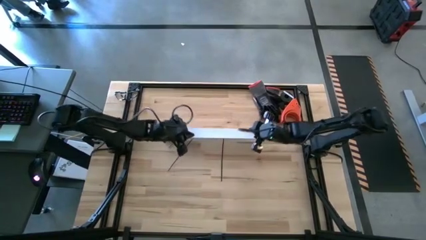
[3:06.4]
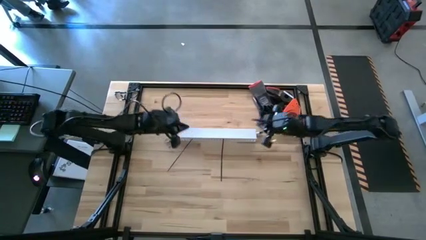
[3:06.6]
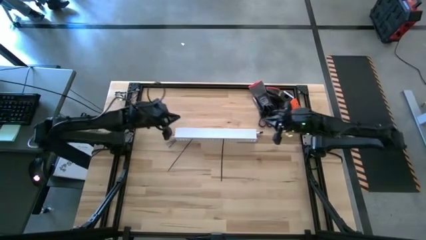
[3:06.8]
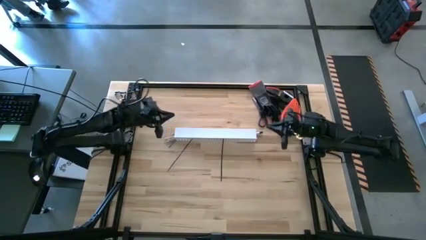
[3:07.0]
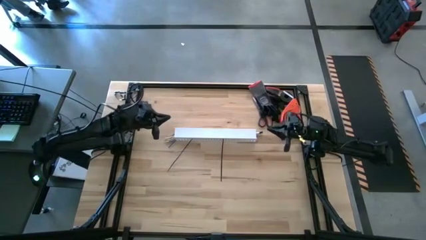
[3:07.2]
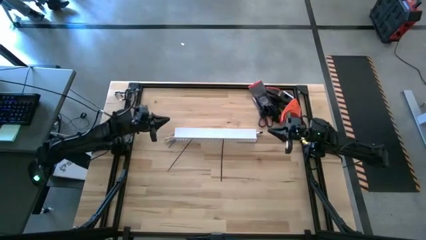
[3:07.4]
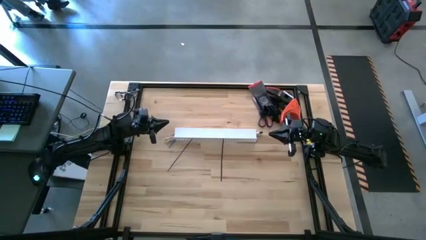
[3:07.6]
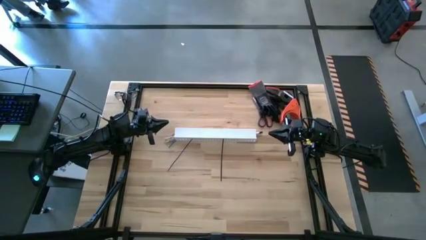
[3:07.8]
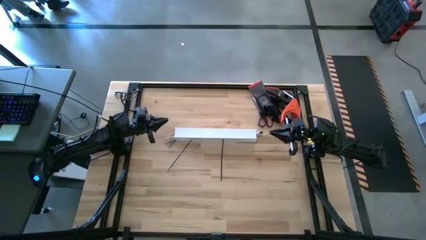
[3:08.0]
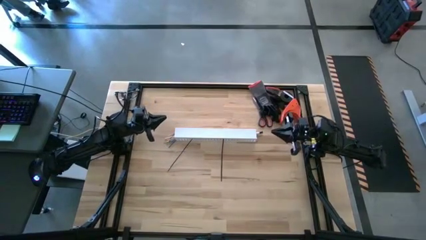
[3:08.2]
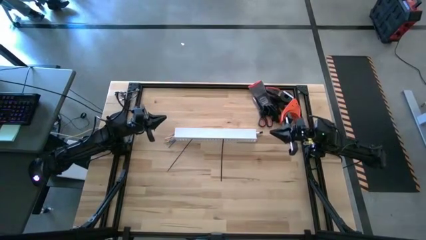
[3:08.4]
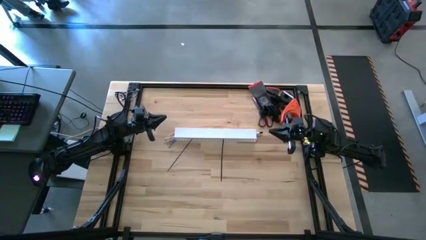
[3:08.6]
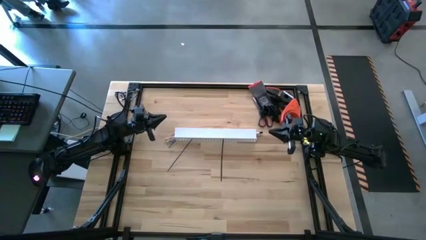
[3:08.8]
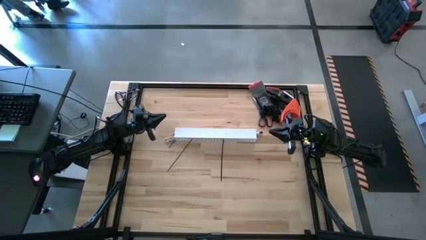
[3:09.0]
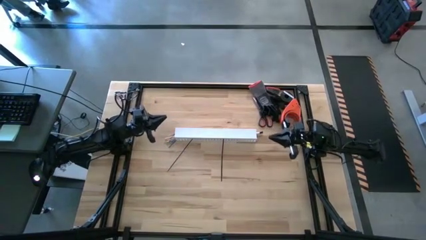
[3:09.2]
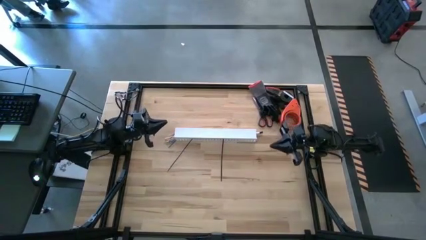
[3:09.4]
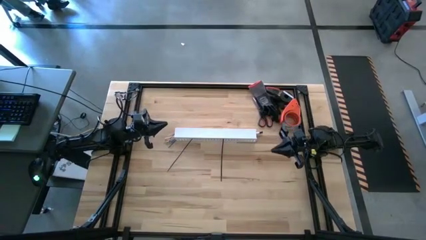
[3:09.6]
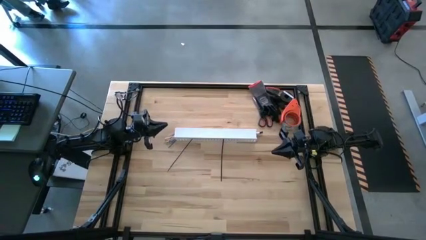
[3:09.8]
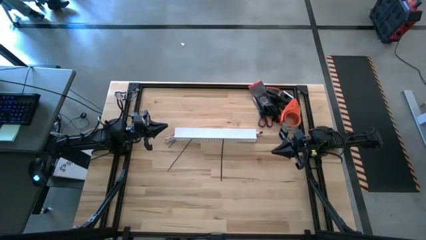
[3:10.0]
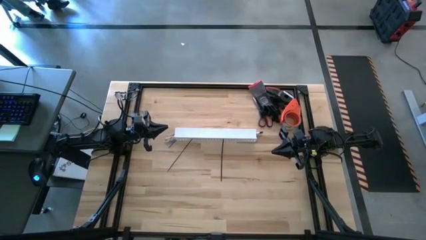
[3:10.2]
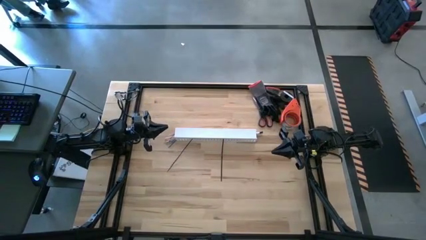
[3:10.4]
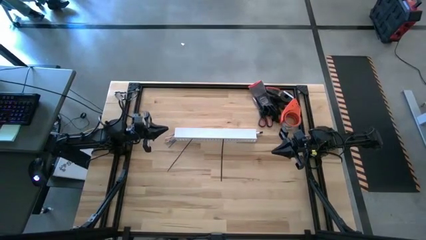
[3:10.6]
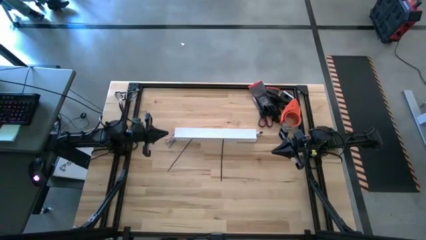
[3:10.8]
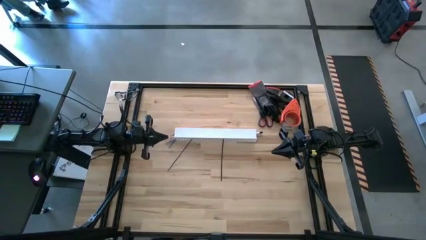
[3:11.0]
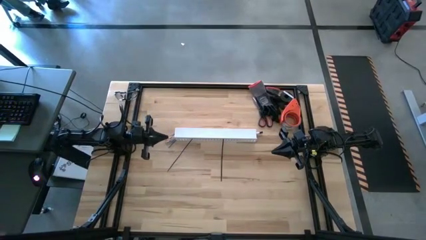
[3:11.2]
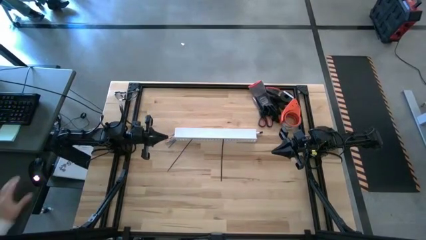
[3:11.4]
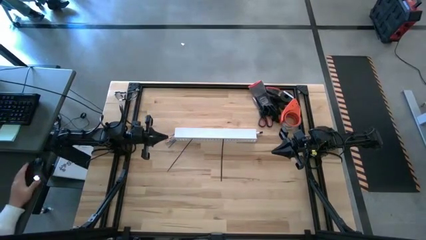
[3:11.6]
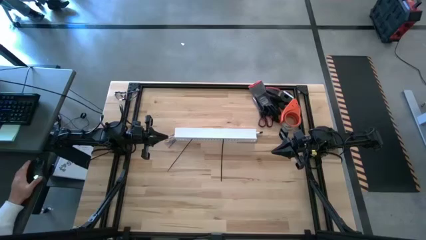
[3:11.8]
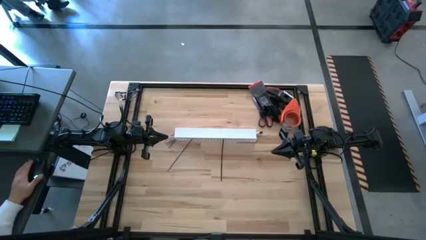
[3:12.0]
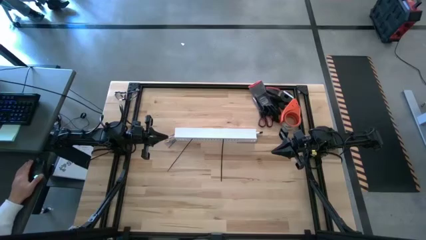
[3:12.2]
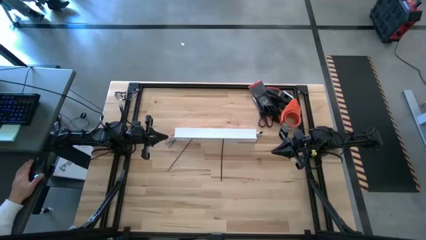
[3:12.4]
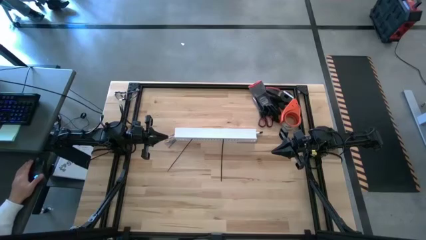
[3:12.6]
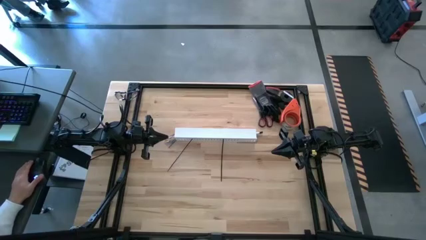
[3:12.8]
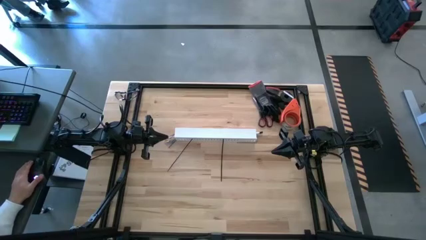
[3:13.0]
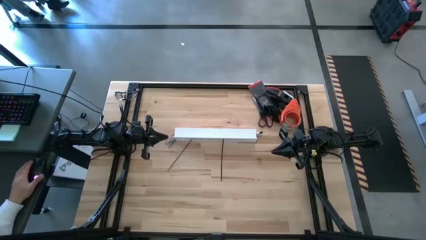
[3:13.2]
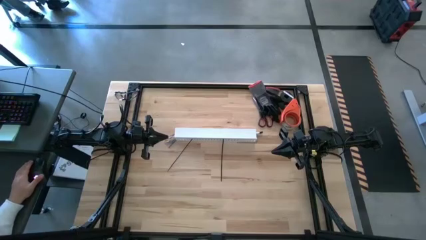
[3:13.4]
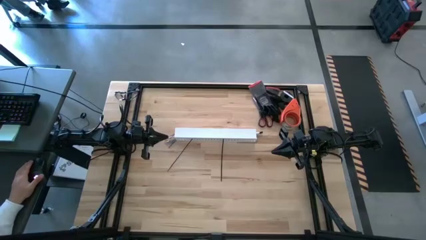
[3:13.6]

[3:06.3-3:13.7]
Task: Ziptie cables
Return to Home Position

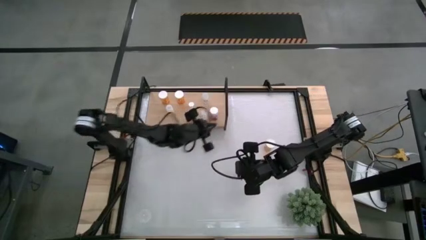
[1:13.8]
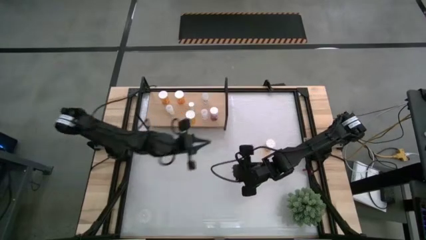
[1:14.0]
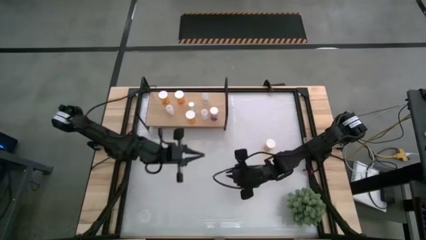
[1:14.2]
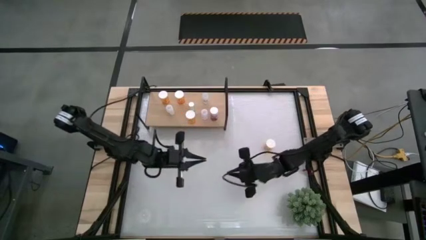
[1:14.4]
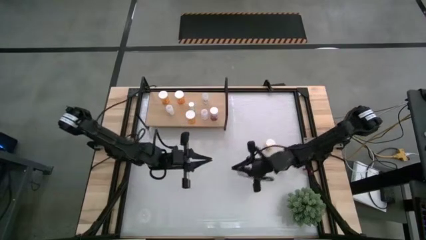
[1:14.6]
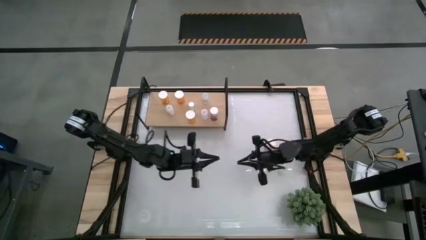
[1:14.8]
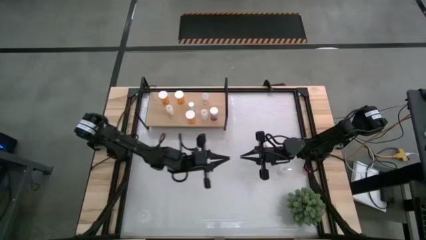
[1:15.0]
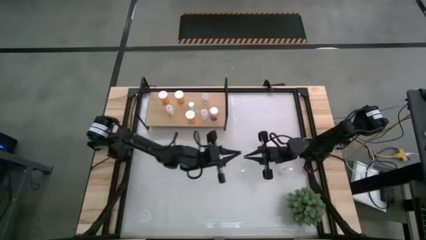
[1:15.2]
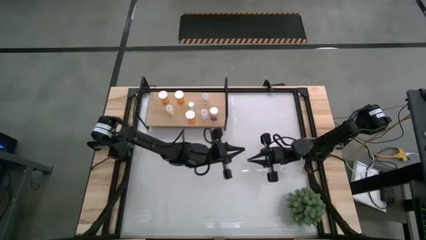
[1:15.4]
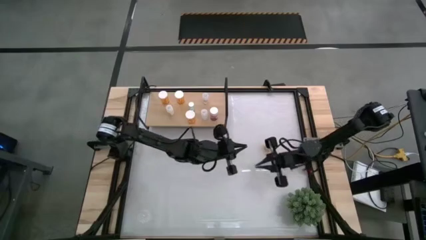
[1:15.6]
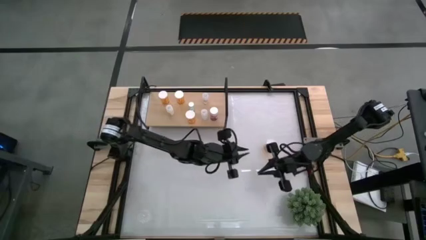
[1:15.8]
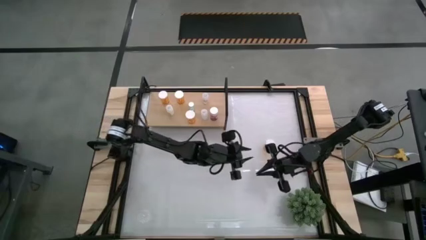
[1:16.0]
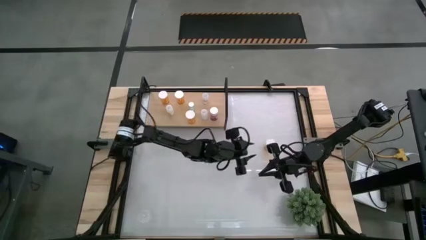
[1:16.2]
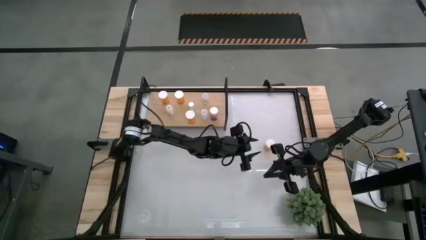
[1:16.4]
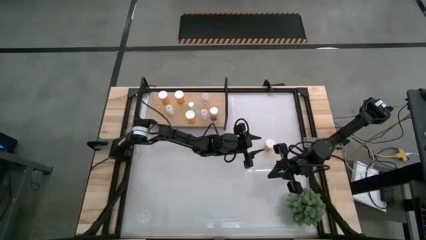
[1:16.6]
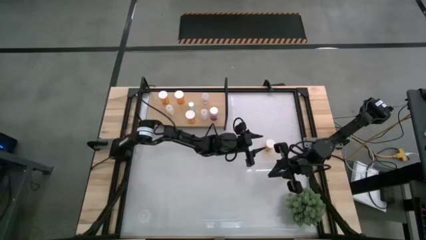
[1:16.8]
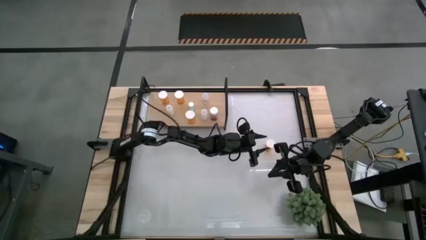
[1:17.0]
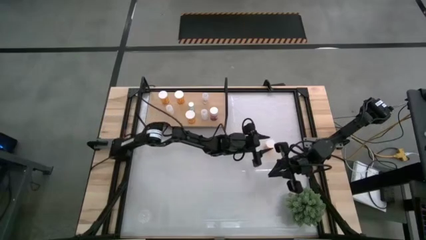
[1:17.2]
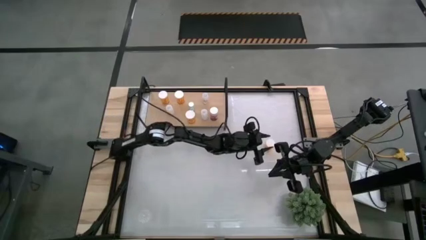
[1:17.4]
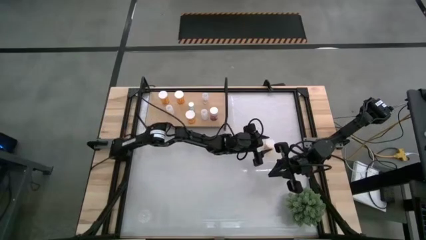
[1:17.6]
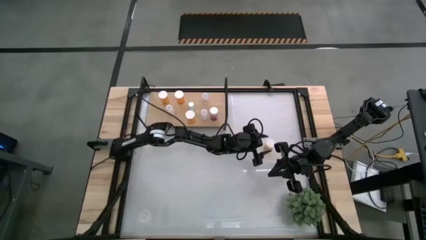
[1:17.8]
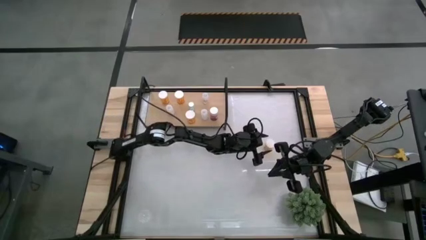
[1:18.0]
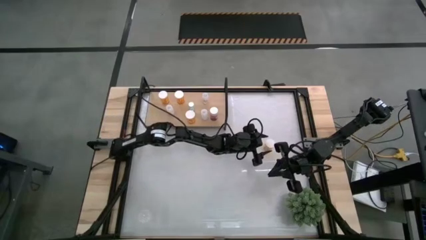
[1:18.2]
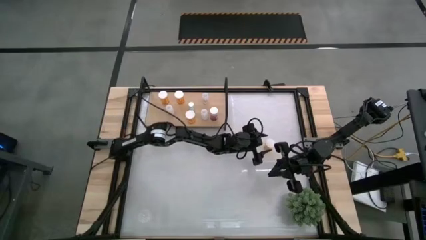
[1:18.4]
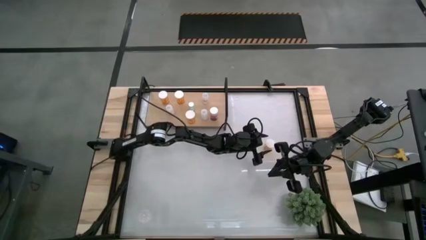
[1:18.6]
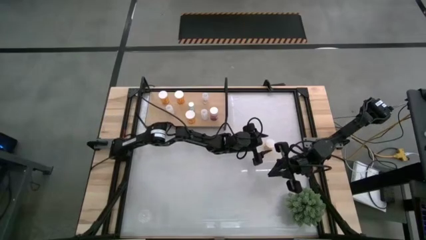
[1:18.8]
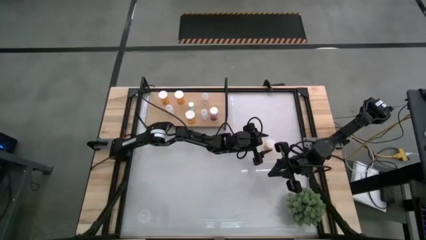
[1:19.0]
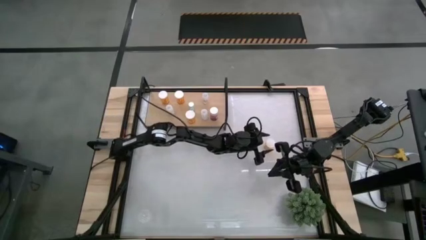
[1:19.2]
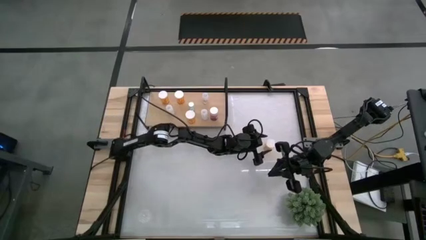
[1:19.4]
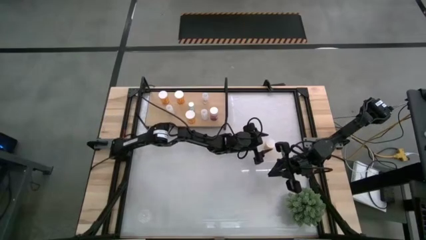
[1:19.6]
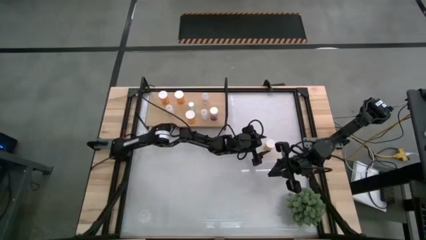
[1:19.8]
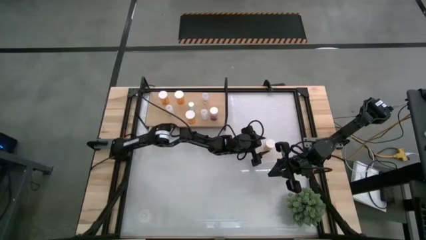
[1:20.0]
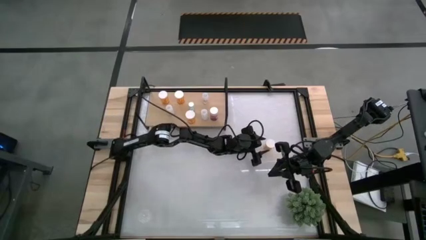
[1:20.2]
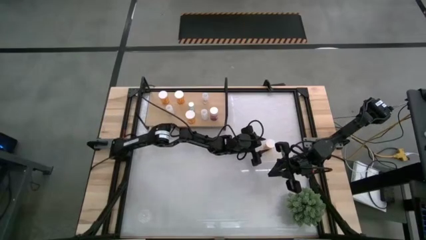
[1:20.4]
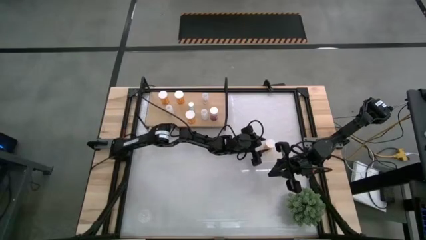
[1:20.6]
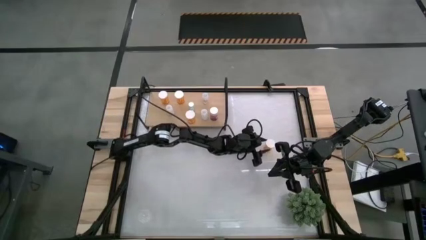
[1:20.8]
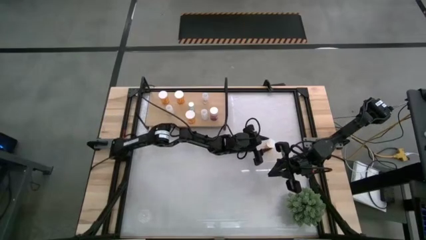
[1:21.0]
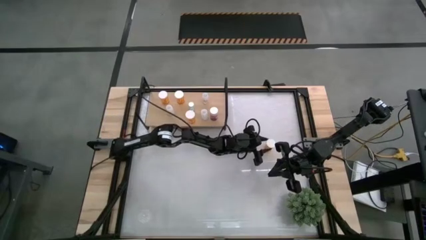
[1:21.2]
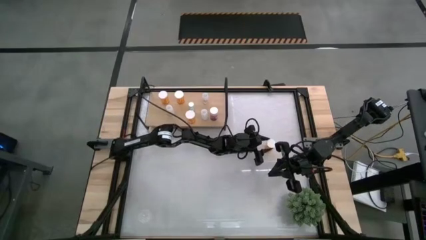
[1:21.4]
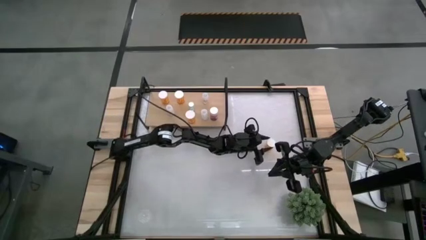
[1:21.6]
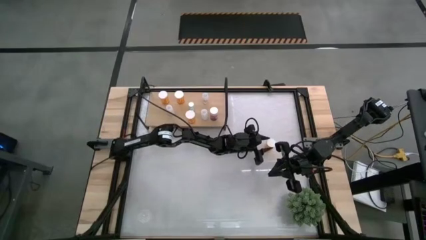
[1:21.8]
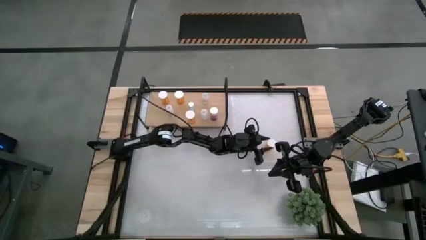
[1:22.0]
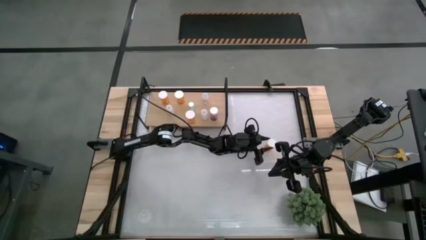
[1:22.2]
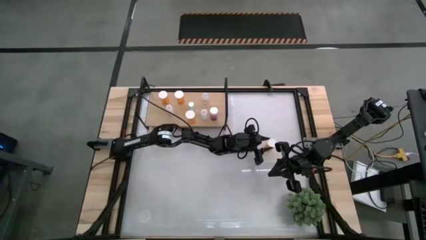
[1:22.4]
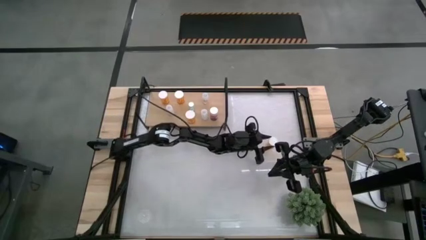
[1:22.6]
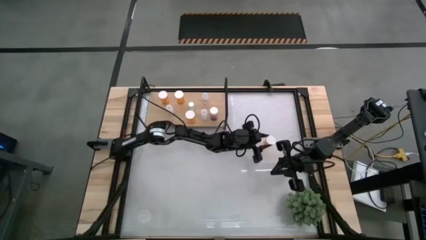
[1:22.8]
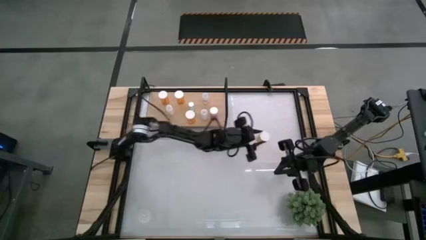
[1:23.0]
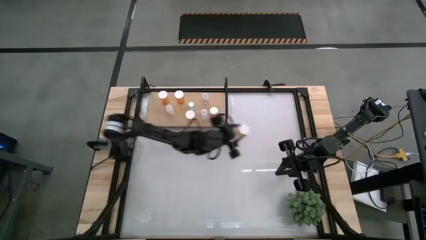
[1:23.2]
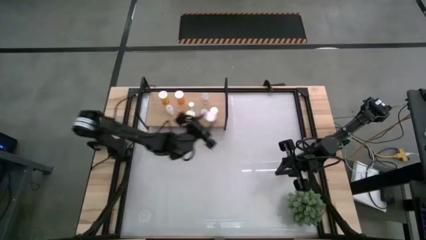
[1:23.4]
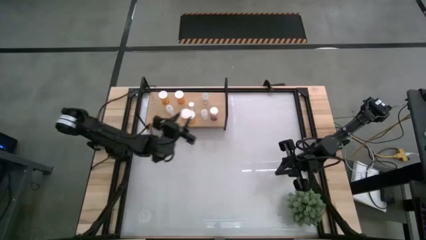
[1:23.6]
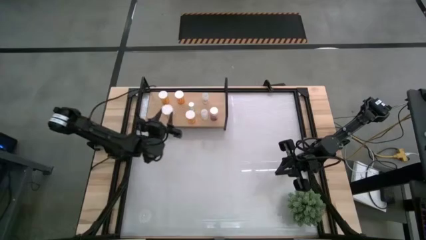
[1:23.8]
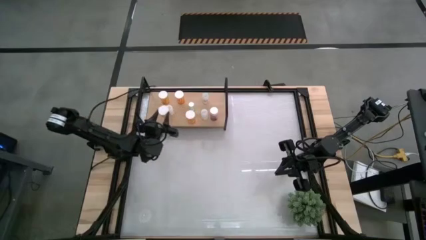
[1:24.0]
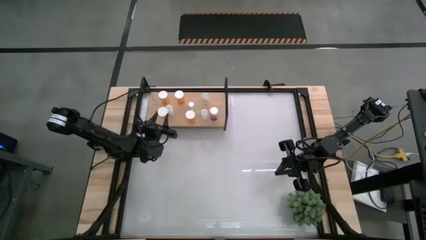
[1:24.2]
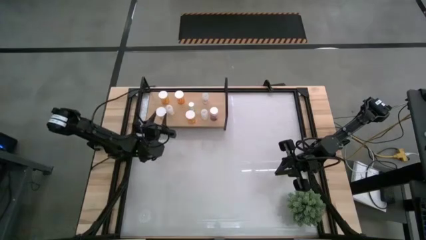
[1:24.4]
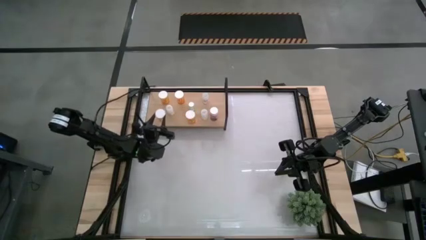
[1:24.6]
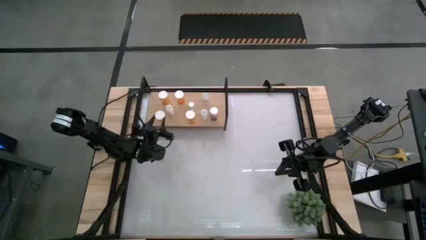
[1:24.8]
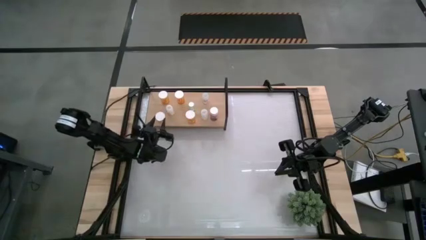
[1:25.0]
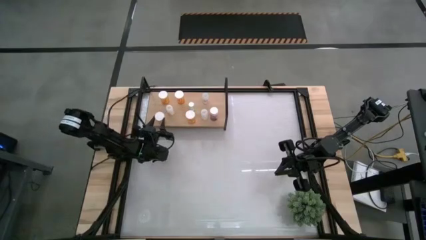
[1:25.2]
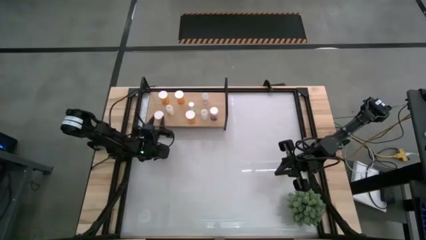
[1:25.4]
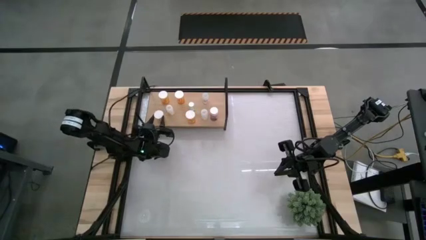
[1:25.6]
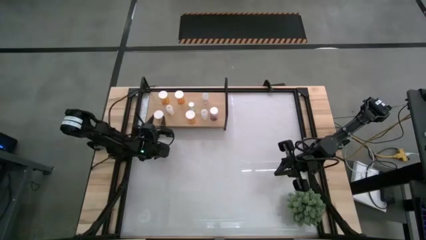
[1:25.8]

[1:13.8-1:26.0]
Task: Pick and place medicine bottles onto shelf by color
Put the large yellow pill bottle on the shelf
